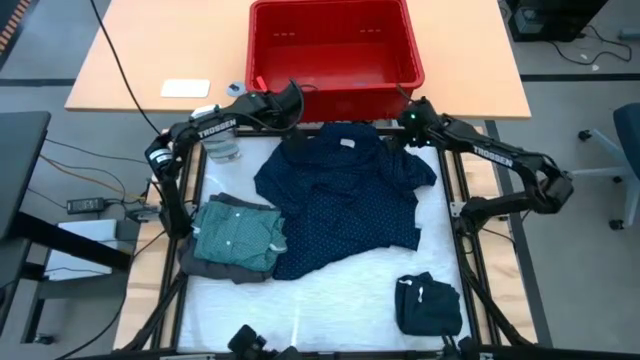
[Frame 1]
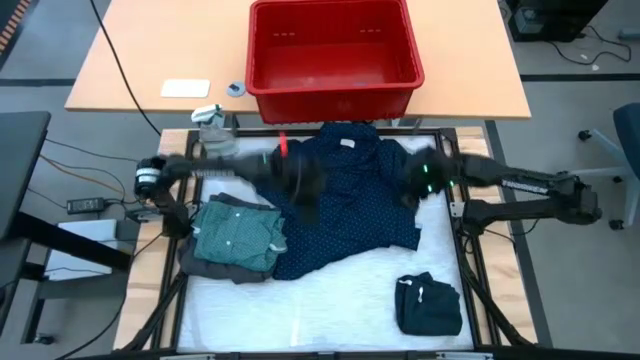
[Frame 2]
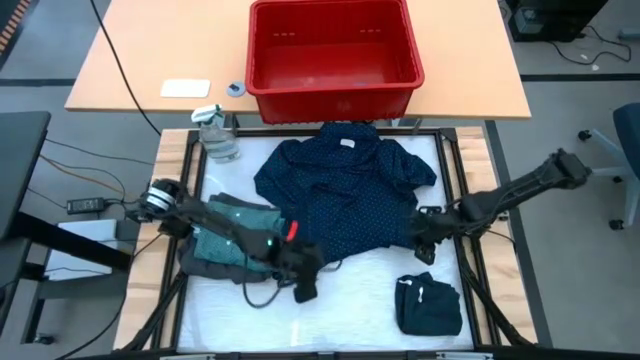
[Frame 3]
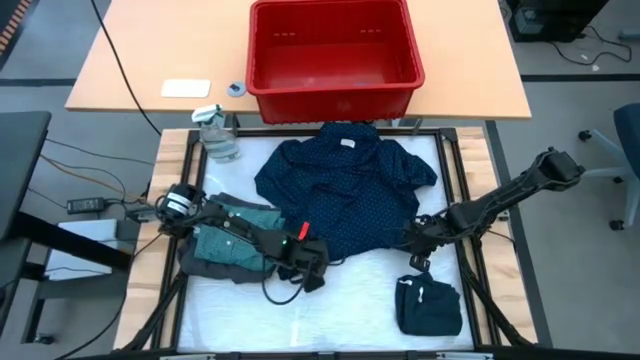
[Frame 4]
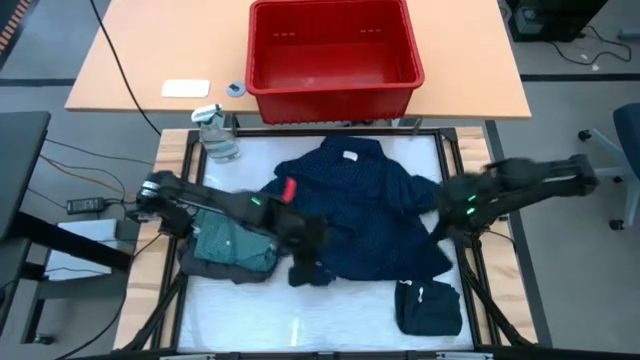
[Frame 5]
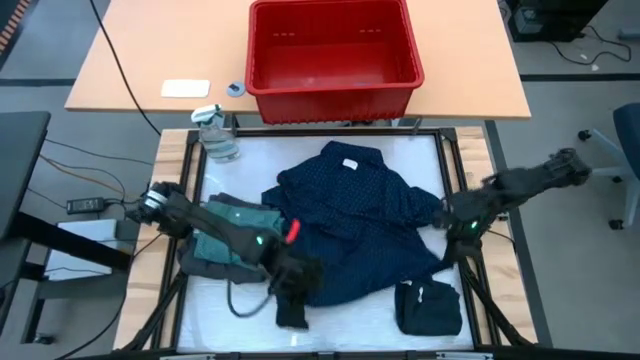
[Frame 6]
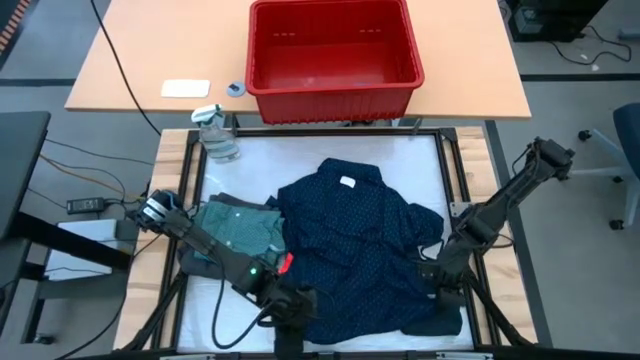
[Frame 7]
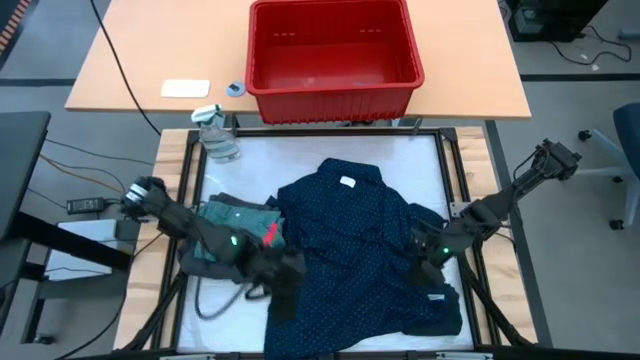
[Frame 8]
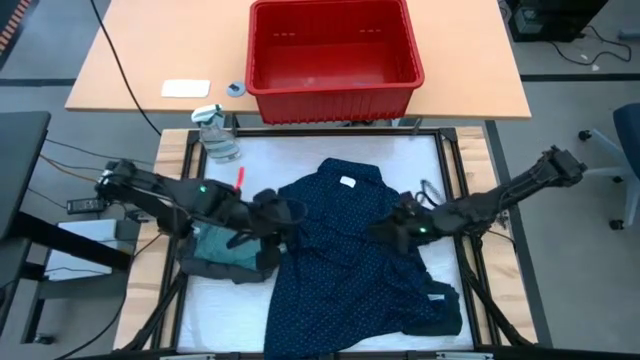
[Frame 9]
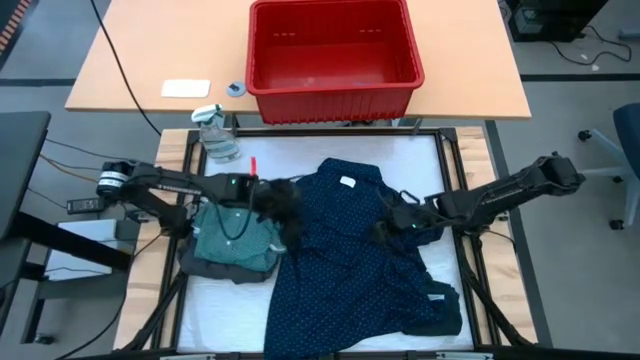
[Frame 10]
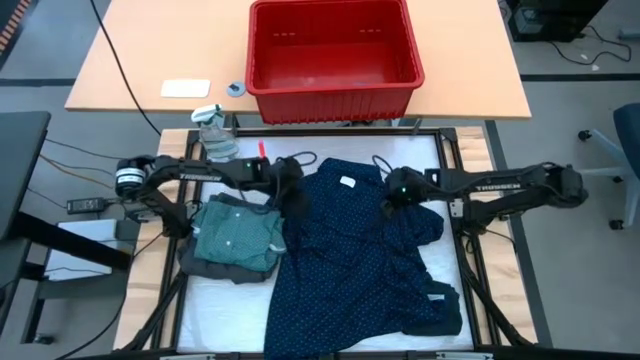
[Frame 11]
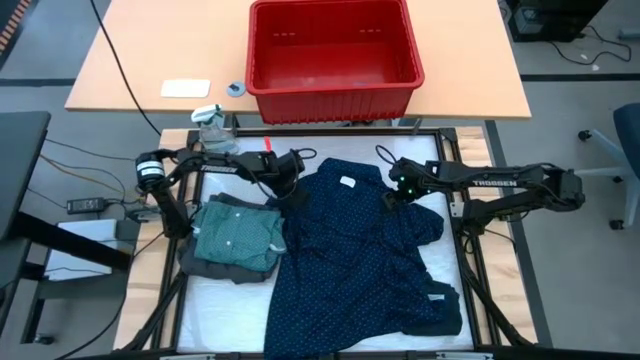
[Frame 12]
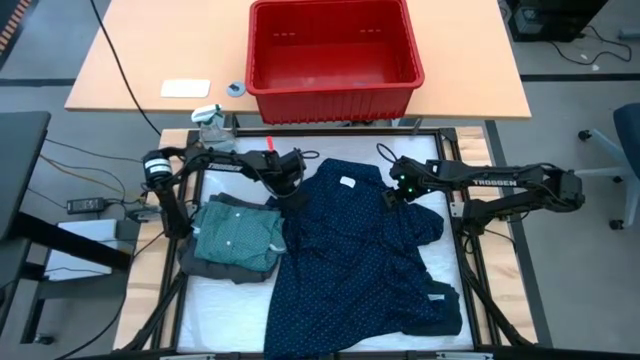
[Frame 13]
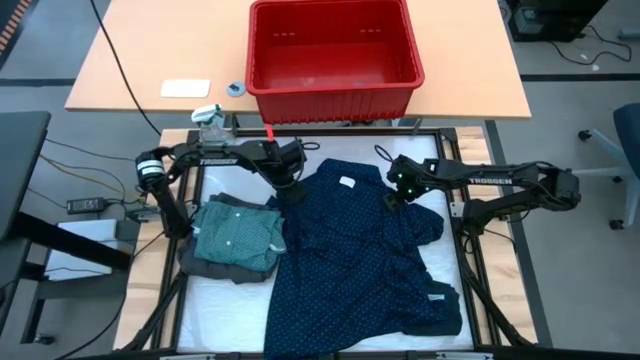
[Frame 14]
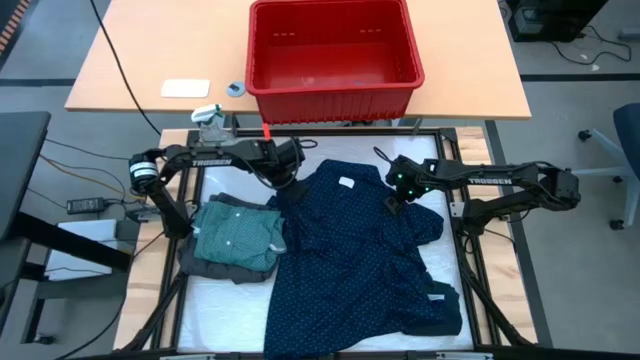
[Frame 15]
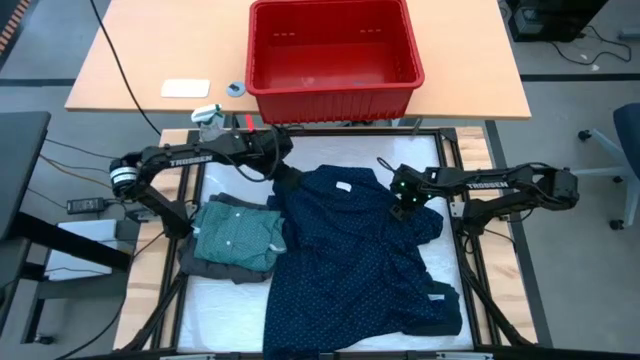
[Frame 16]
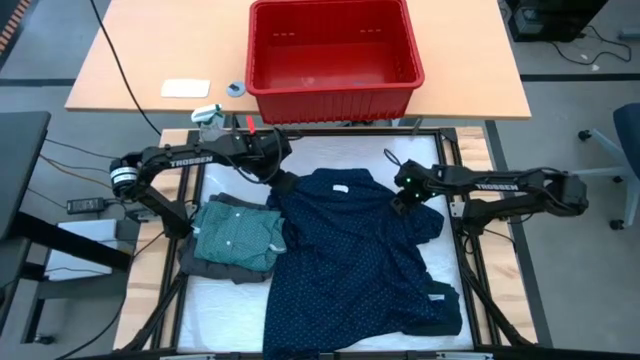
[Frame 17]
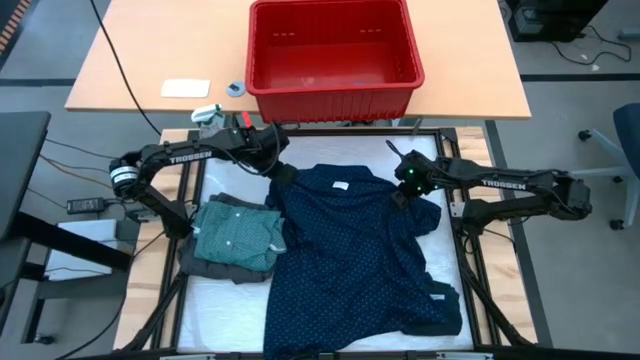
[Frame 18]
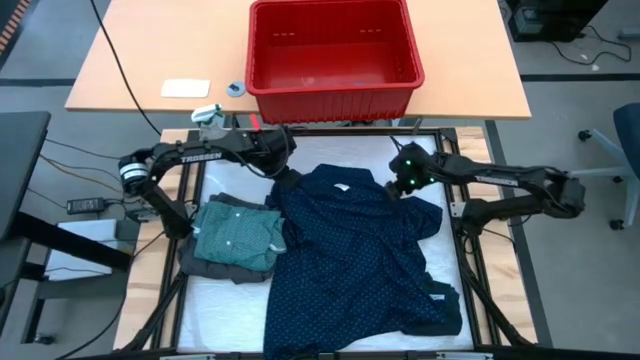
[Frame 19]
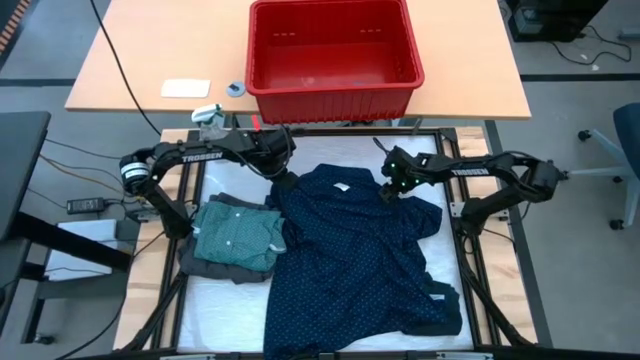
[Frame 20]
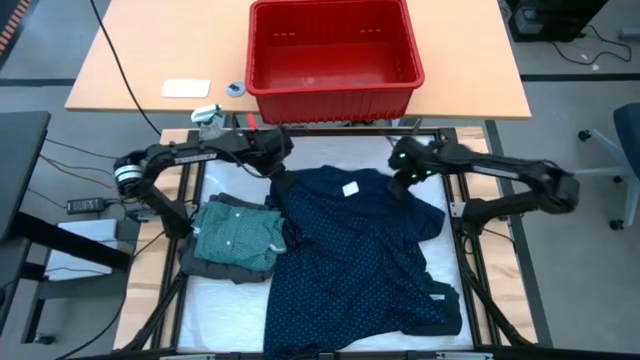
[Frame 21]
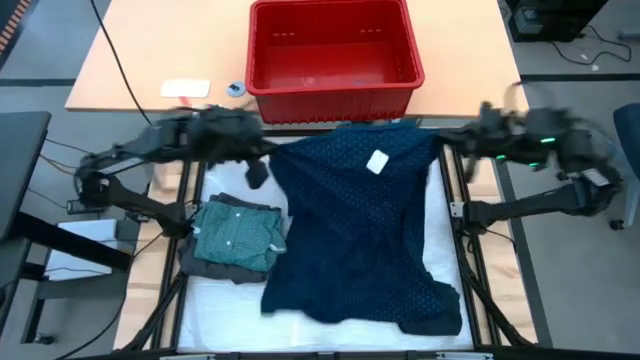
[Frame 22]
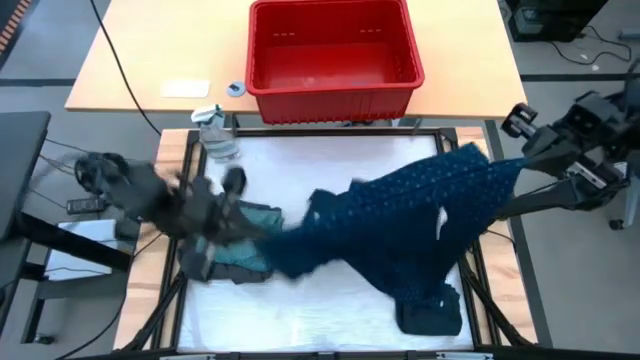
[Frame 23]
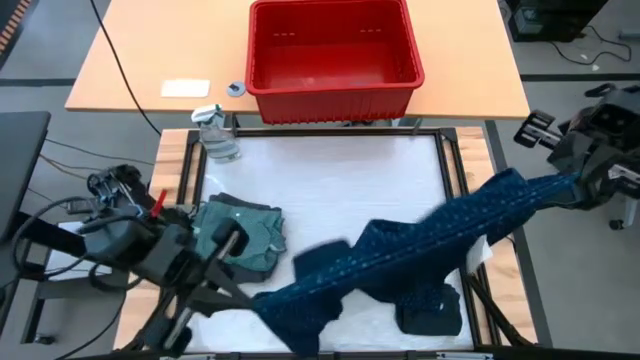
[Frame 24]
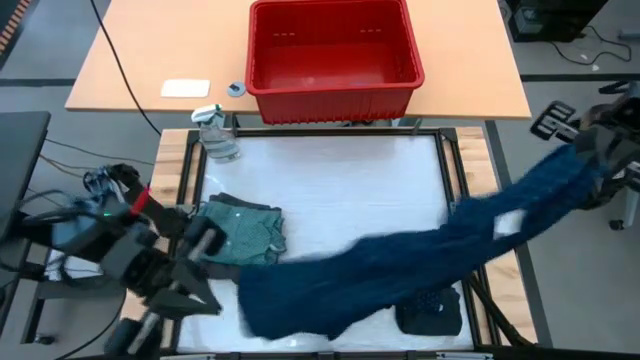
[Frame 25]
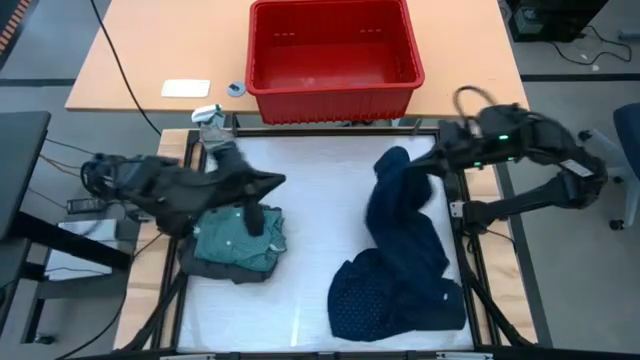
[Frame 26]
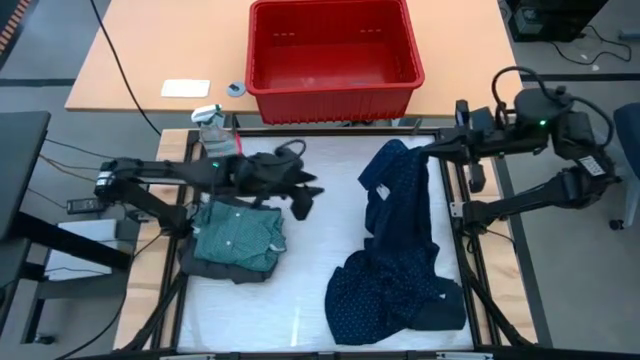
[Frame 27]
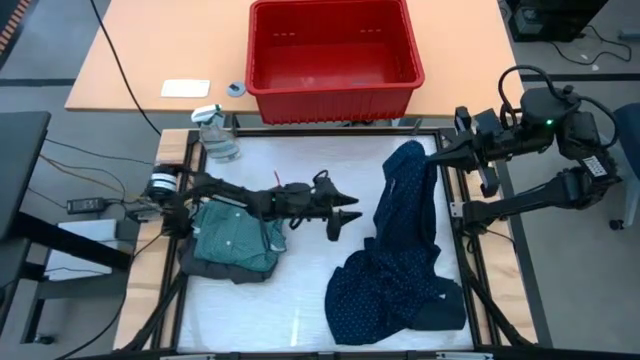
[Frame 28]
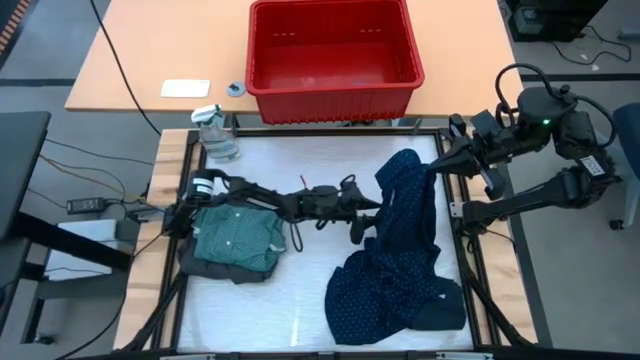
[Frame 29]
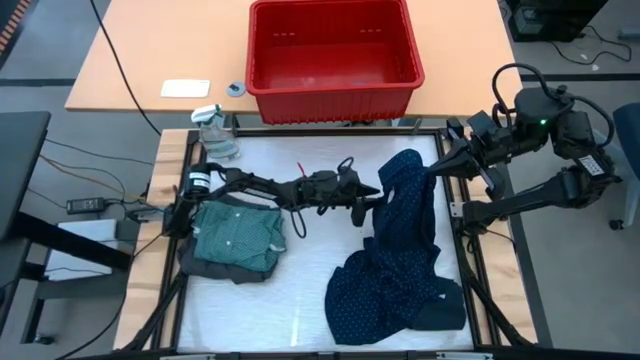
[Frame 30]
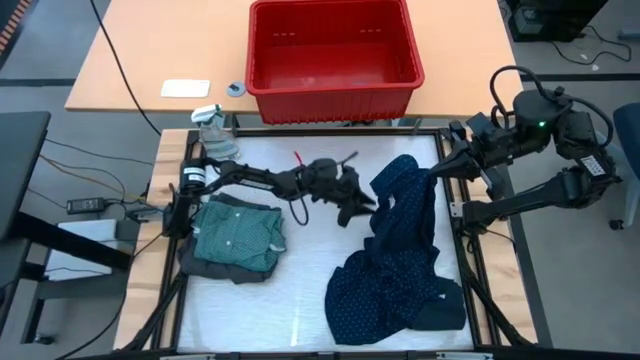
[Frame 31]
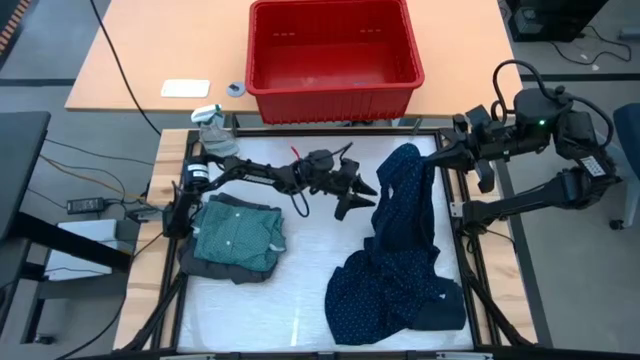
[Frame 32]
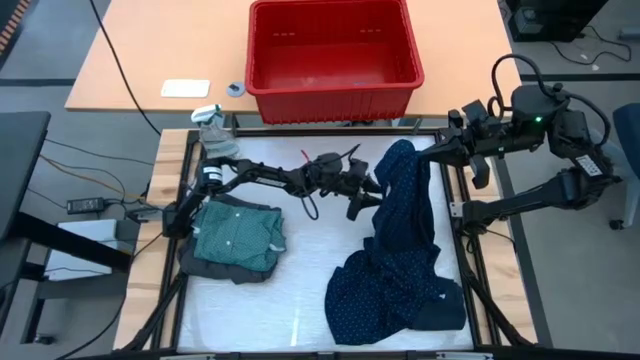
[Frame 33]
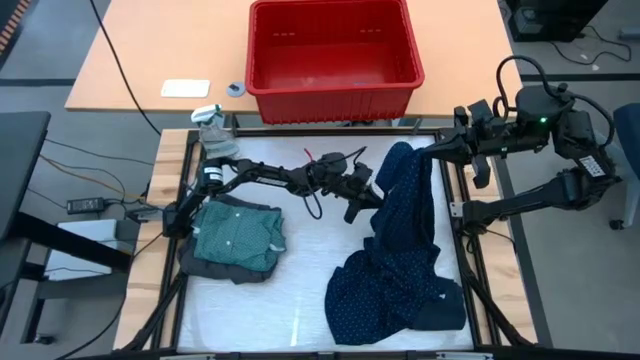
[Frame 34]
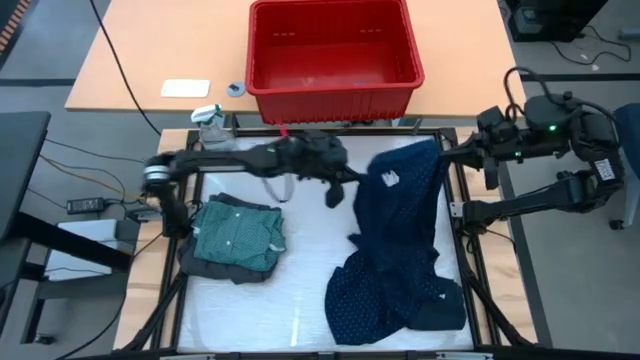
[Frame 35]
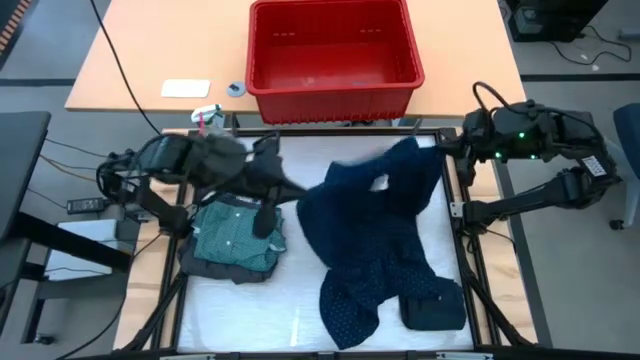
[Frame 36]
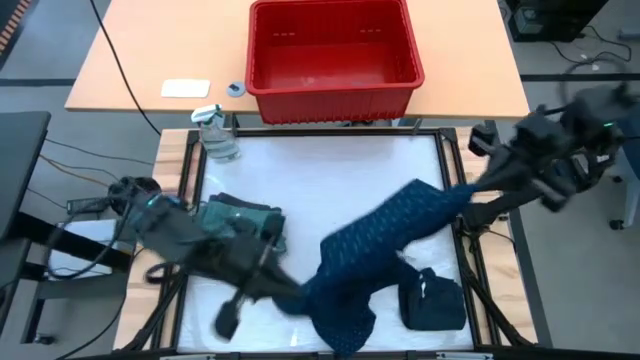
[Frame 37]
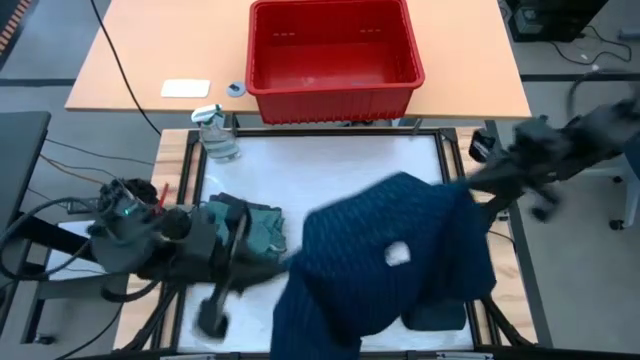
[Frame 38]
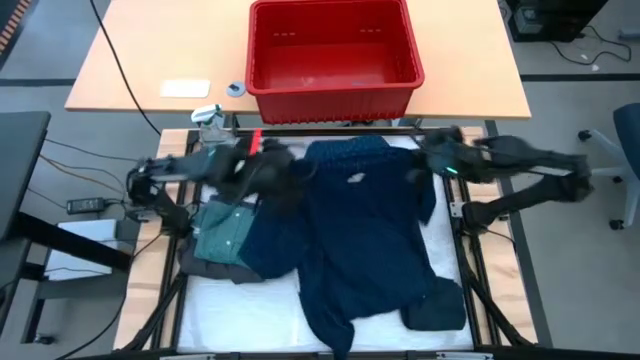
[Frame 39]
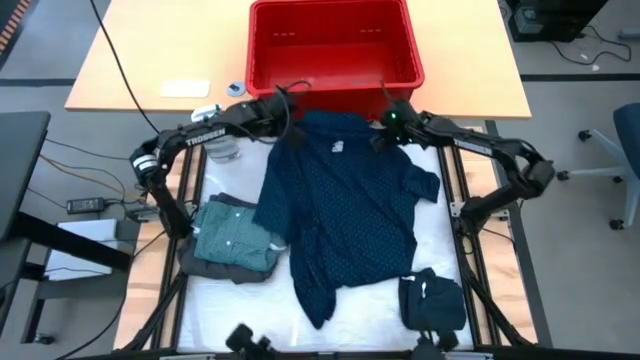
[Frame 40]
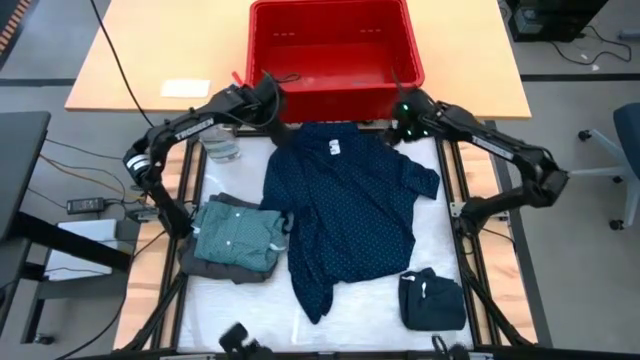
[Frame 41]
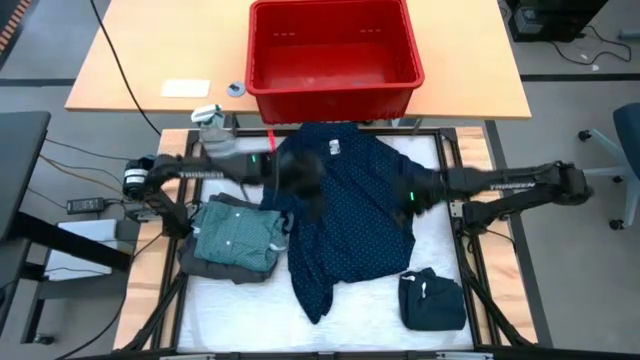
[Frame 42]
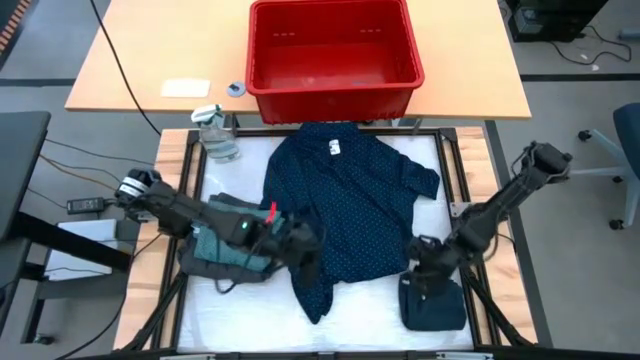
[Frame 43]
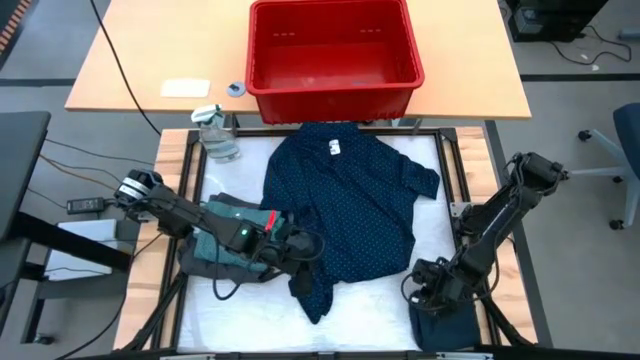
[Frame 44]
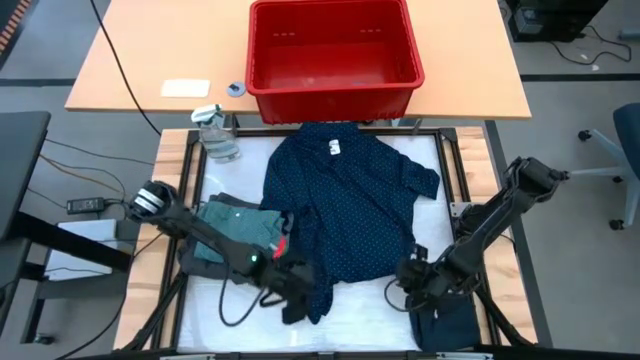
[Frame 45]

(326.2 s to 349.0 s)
Task: Fold Laundry from Bin
Fold the blue polo shirt on the table
